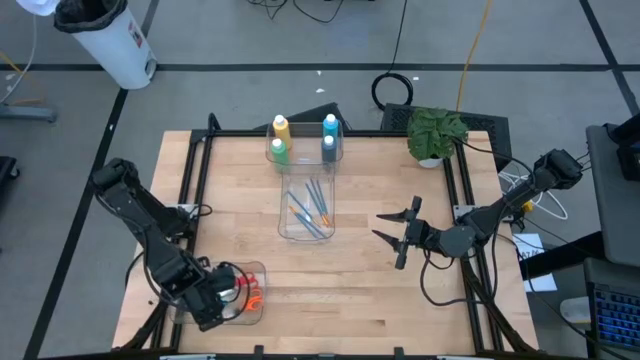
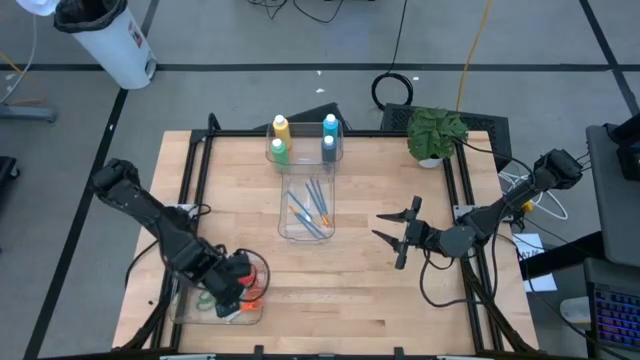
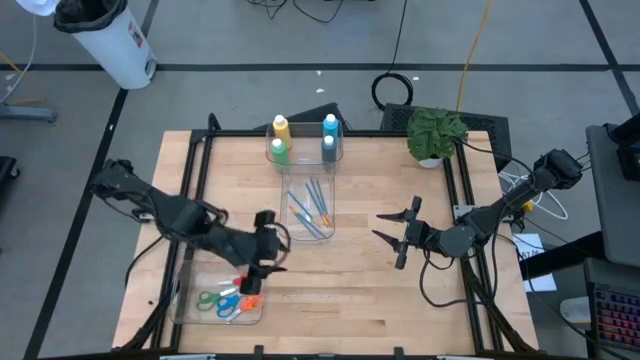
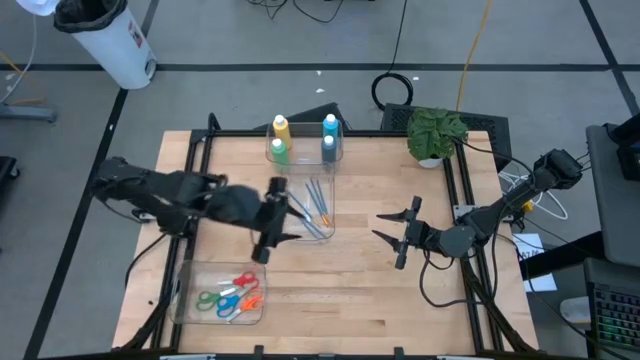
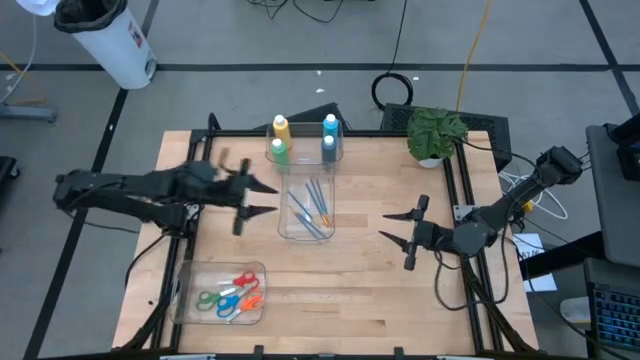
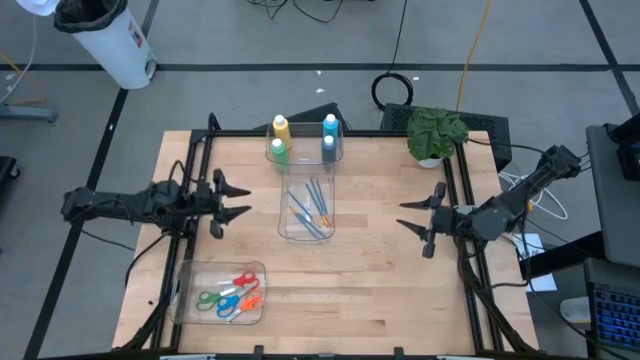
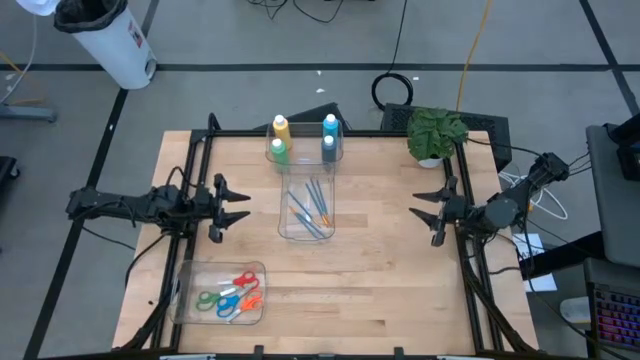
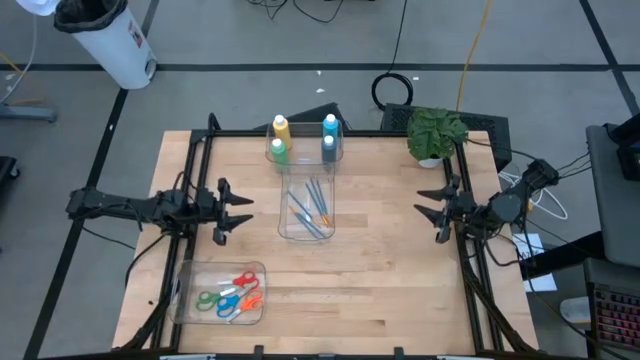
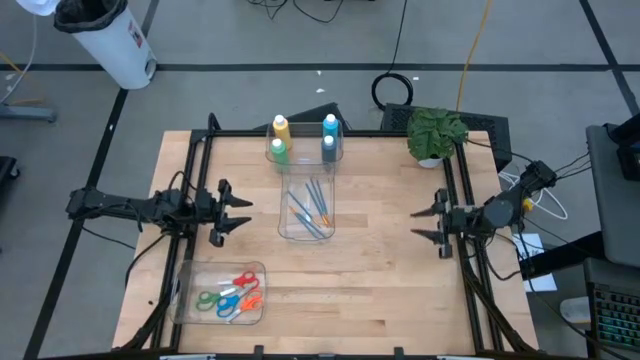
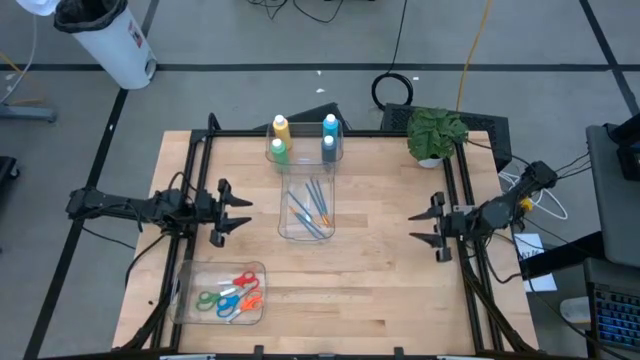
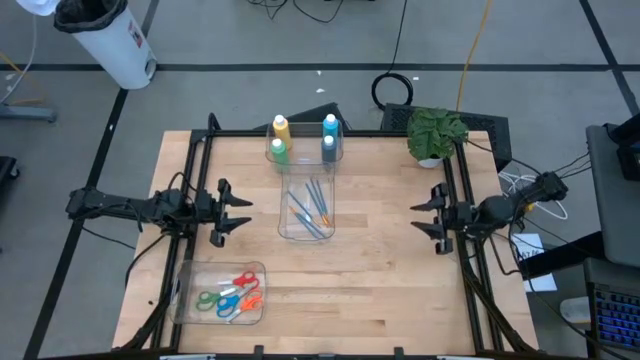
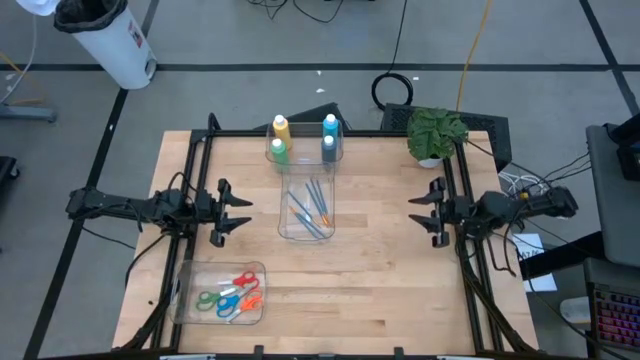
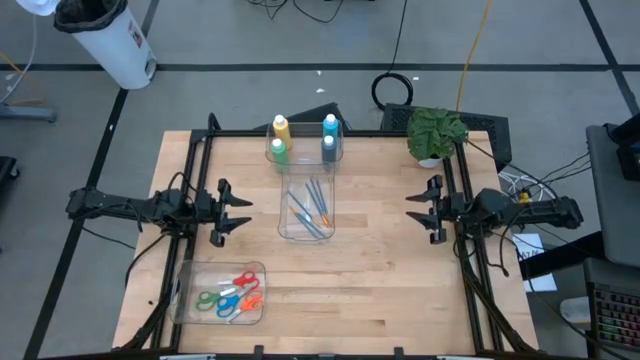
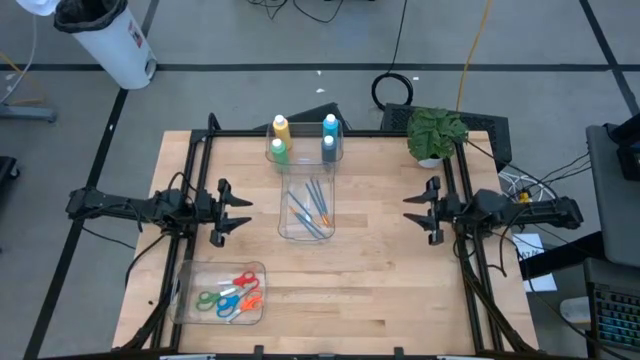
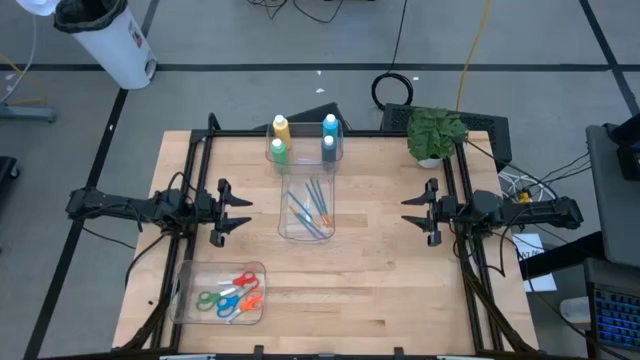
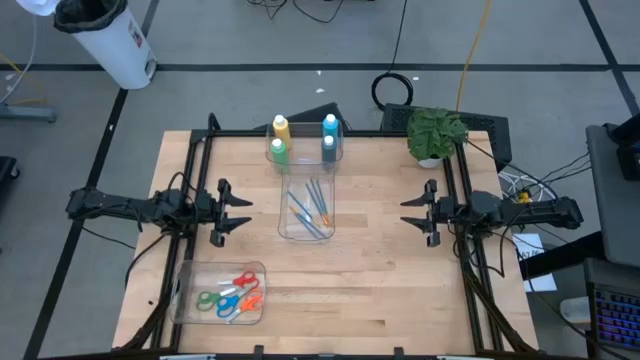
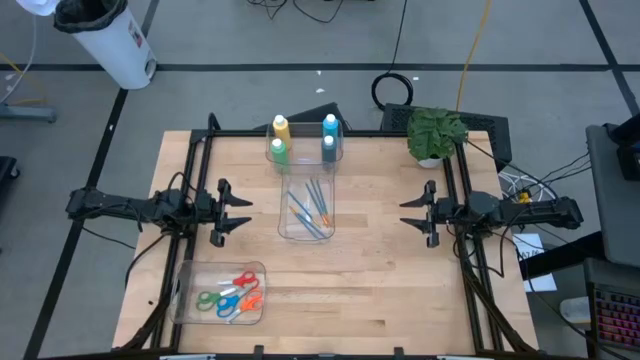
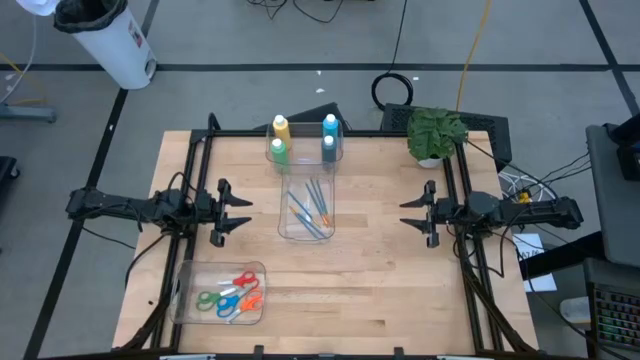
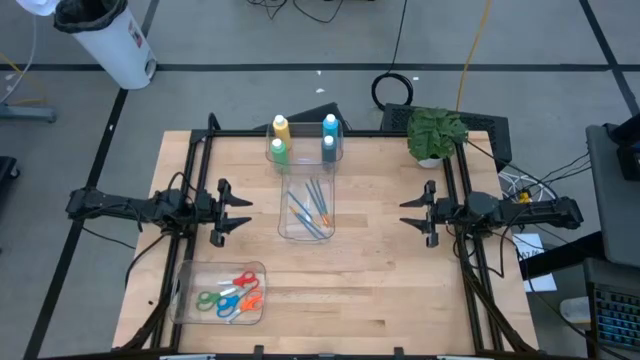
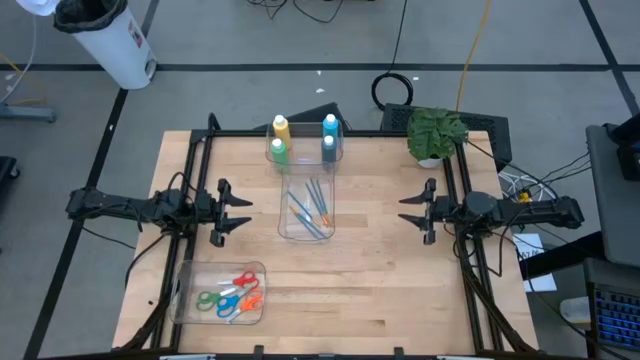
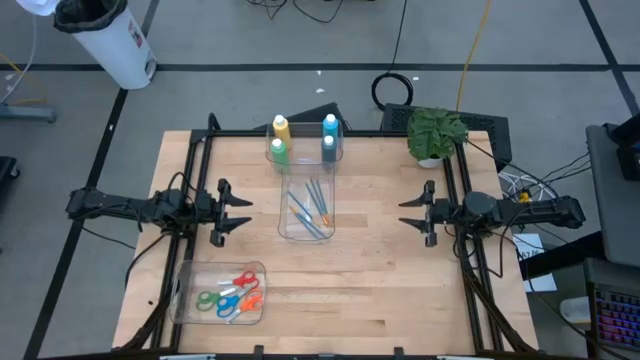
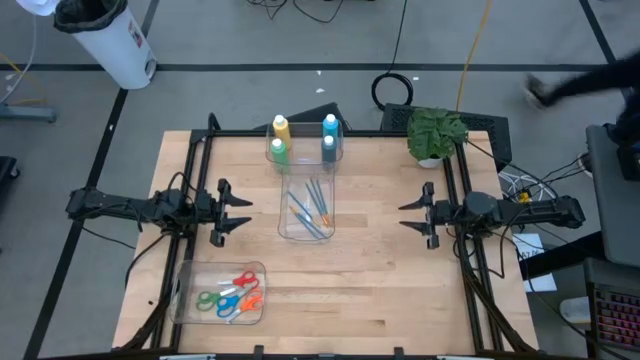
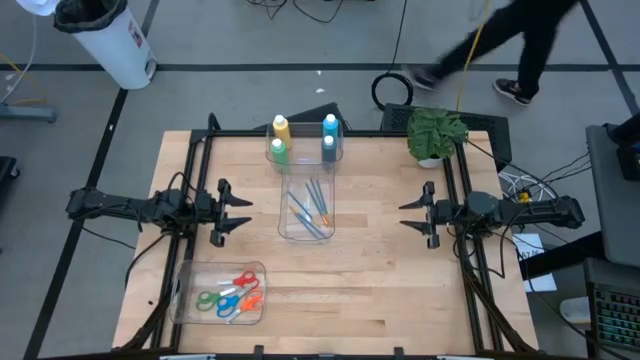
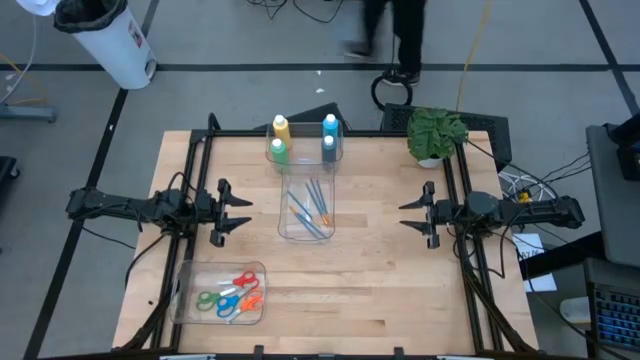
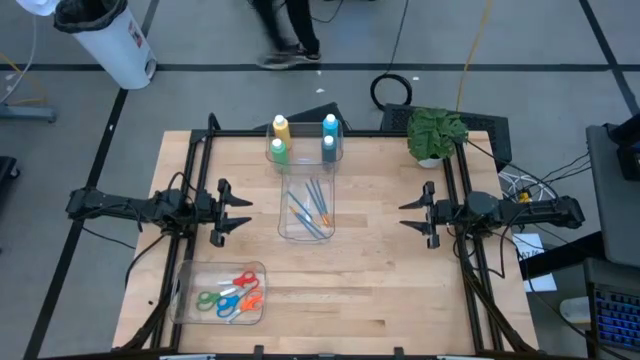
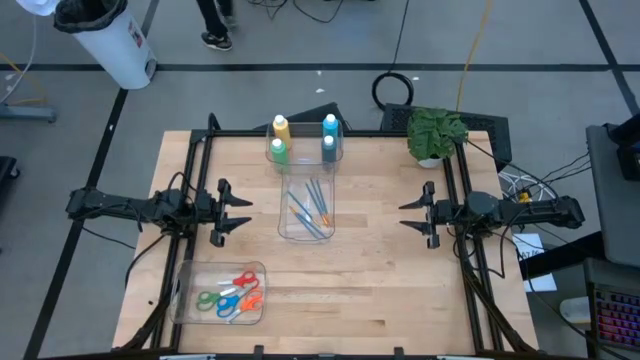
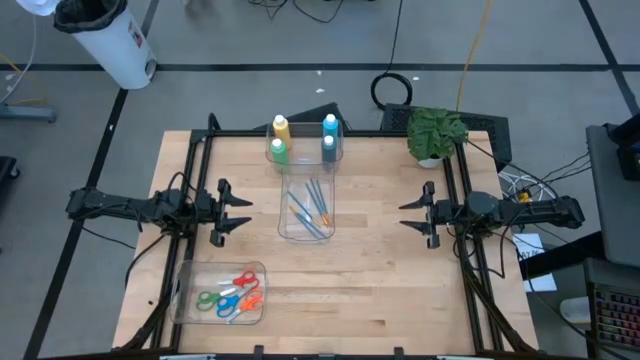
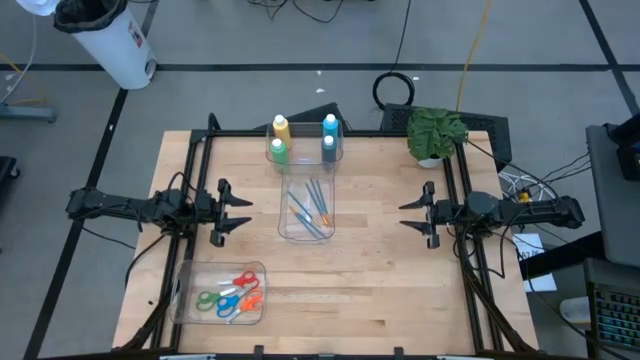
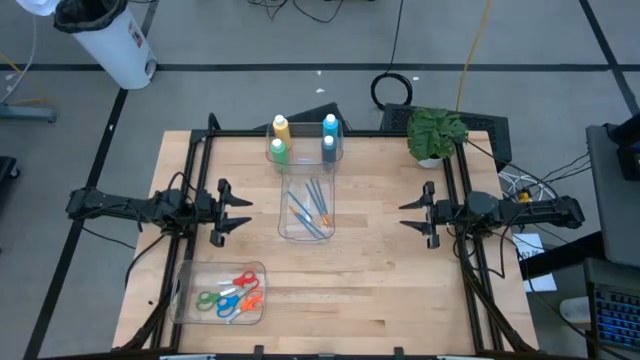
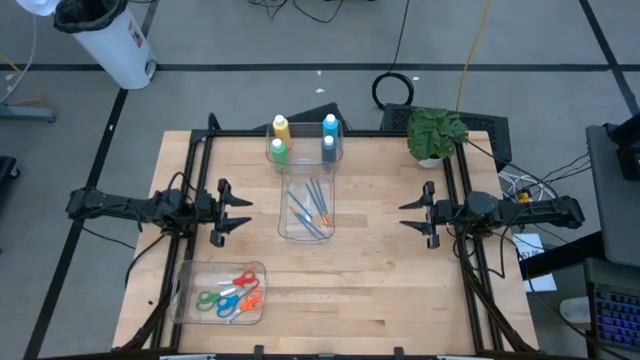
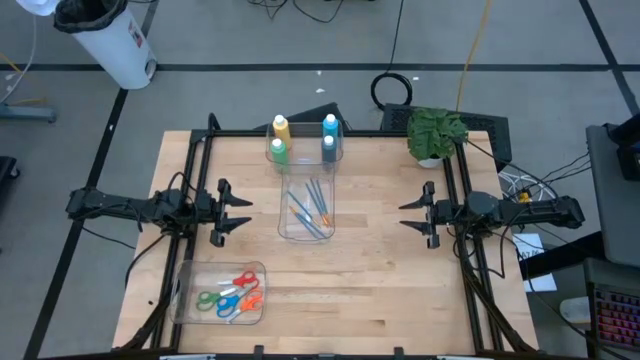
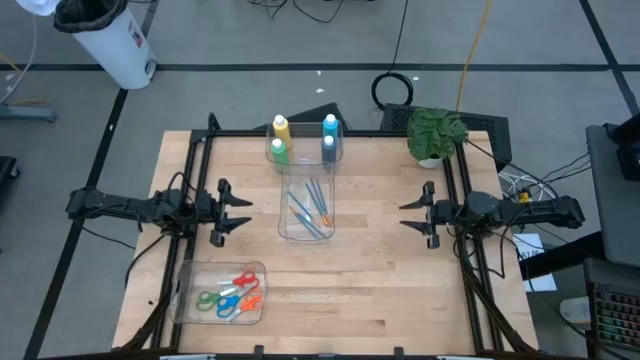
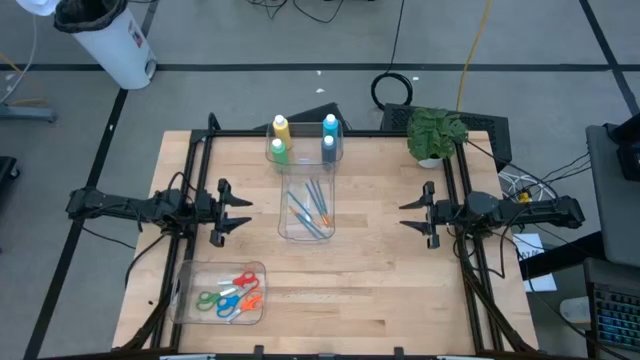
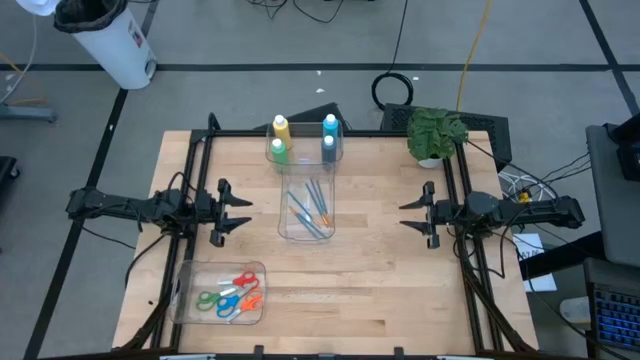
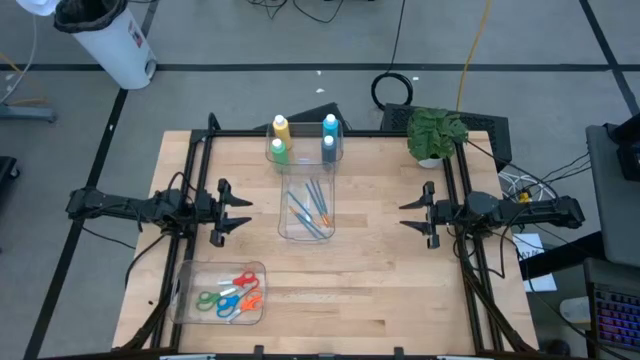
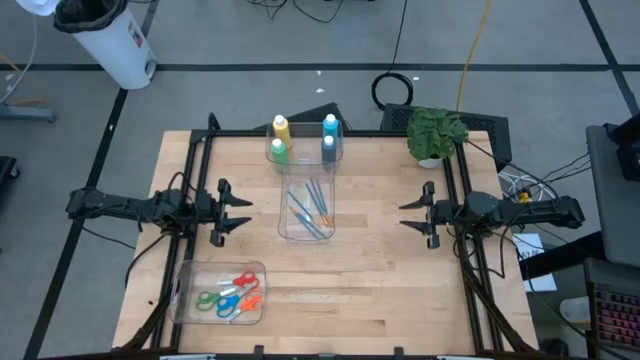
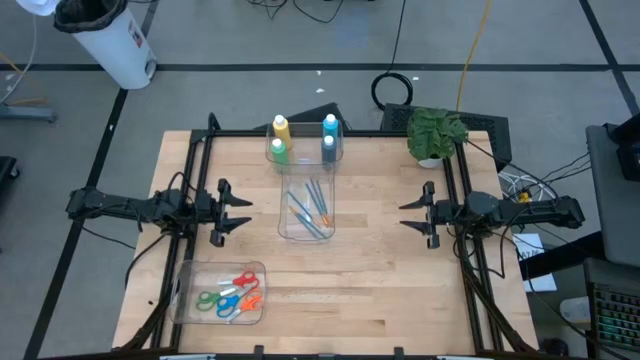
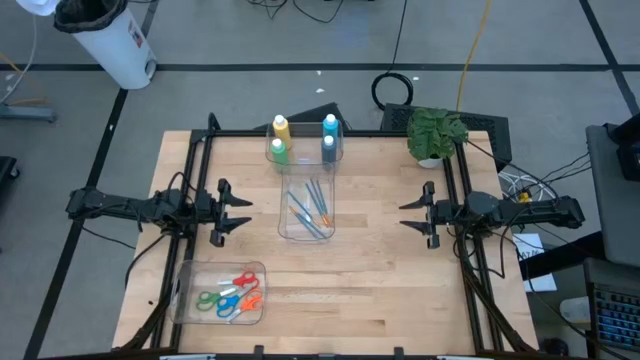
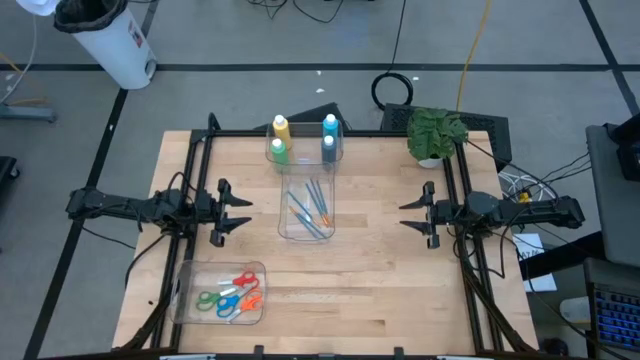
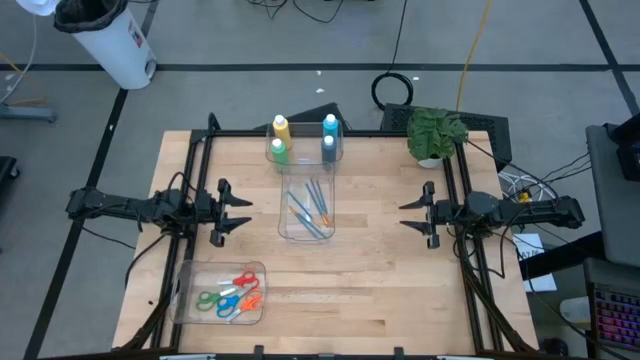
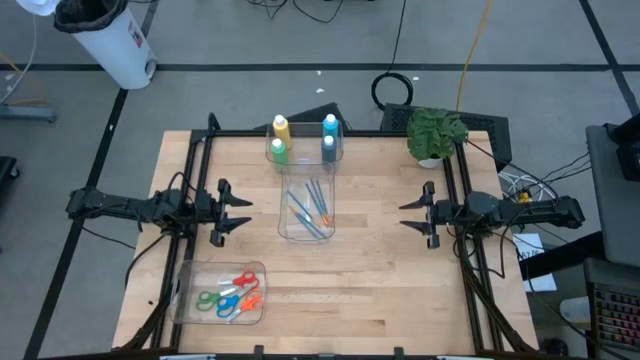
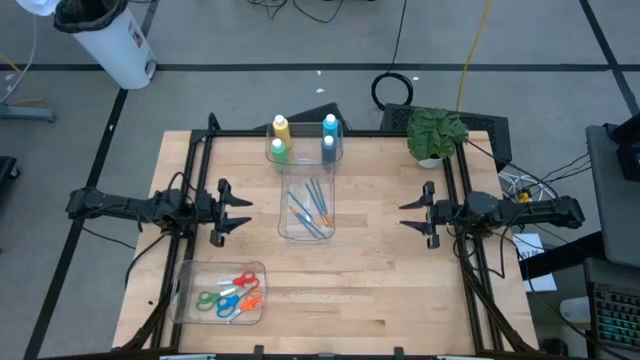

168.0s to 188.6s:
Task: Pick & Place Paint Supplies
Return to Home Position
